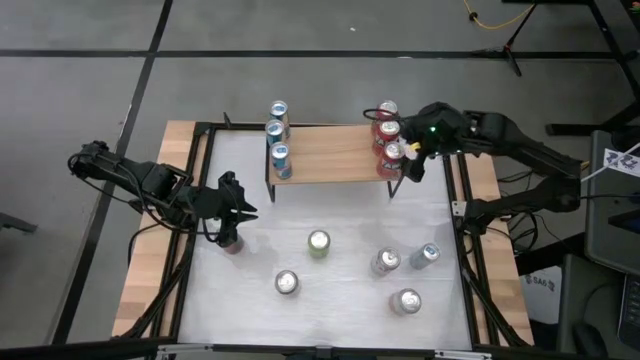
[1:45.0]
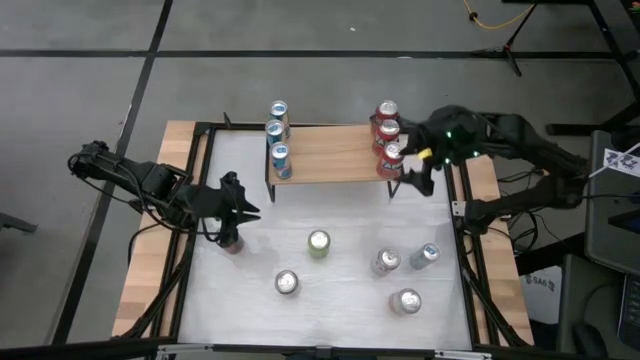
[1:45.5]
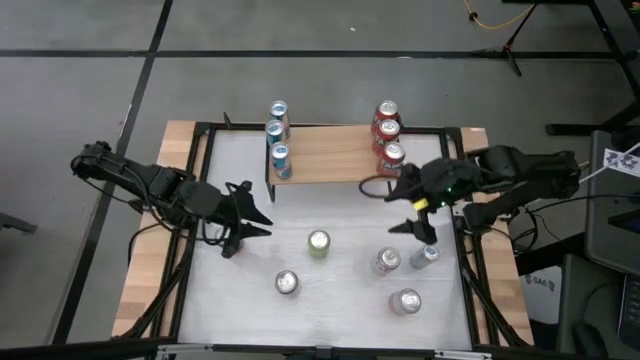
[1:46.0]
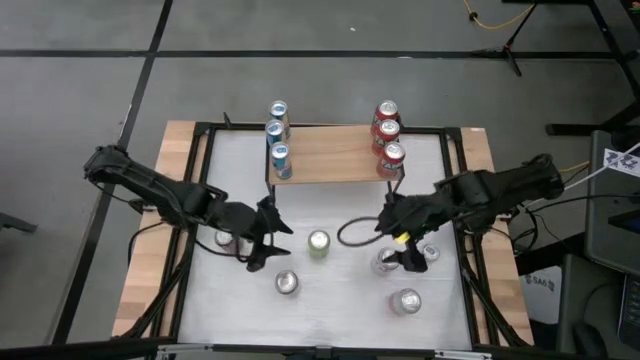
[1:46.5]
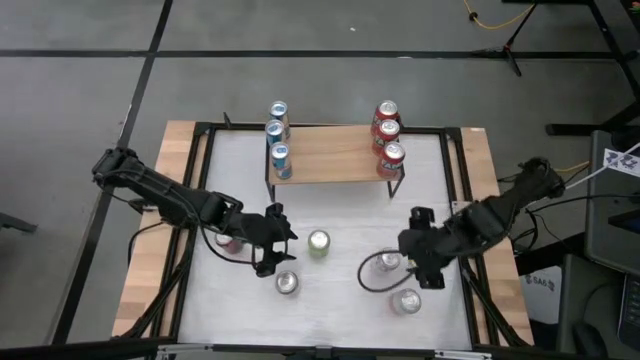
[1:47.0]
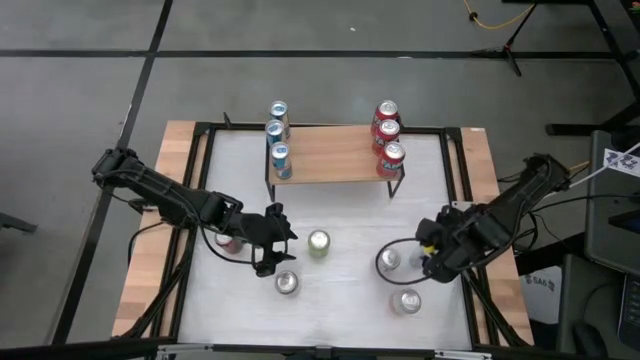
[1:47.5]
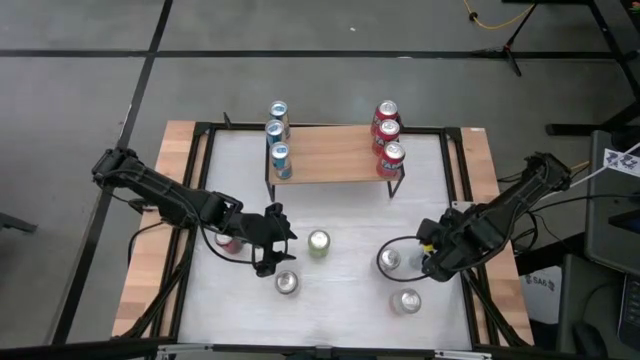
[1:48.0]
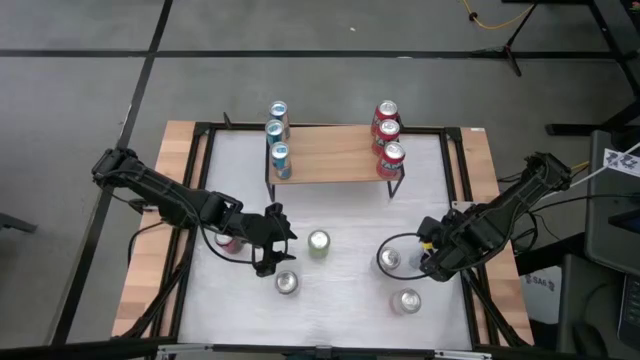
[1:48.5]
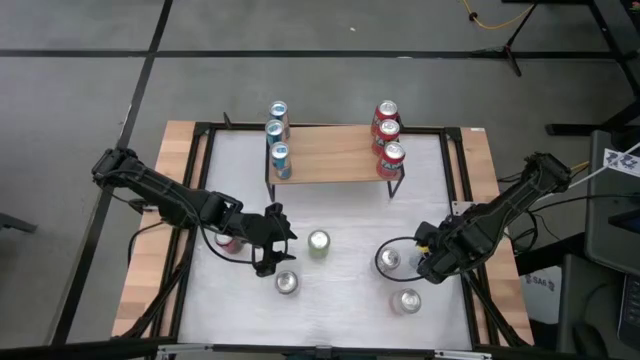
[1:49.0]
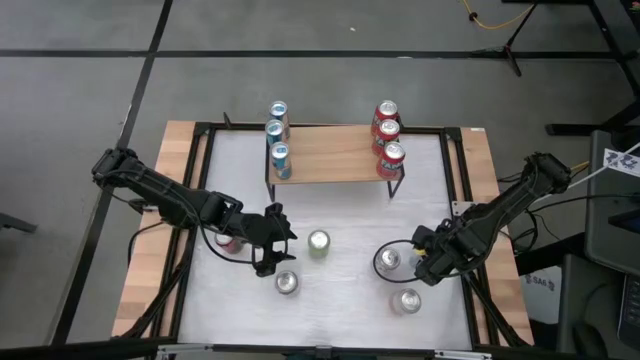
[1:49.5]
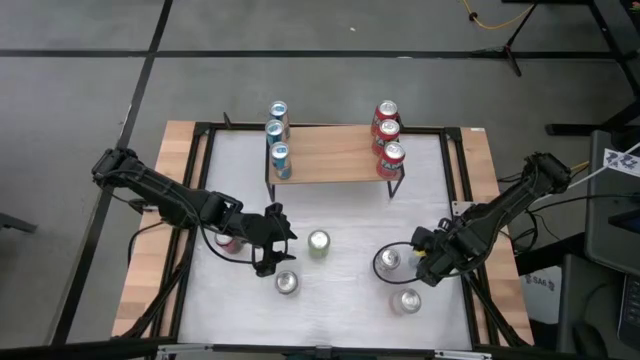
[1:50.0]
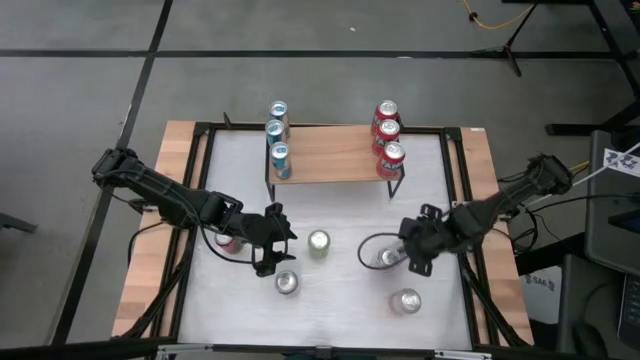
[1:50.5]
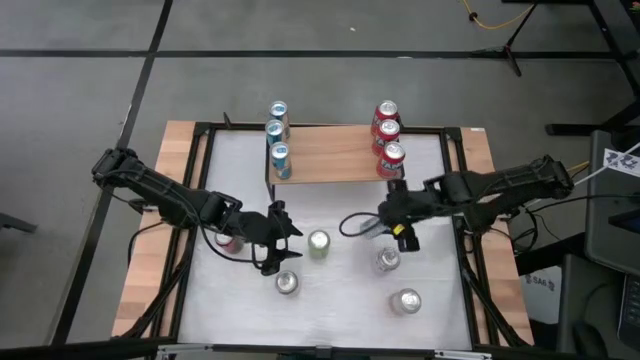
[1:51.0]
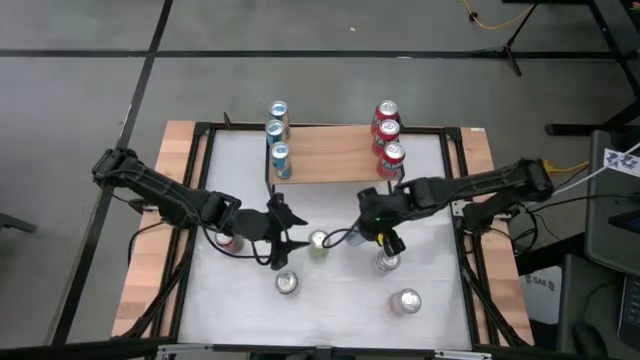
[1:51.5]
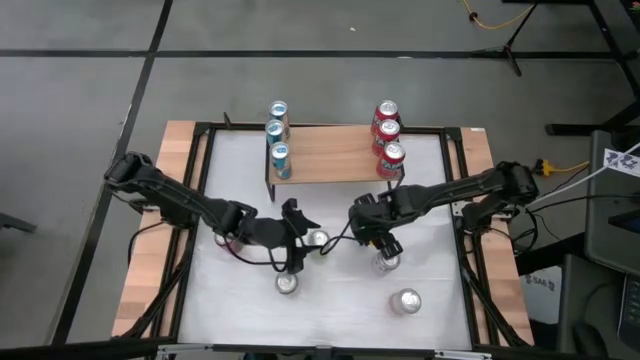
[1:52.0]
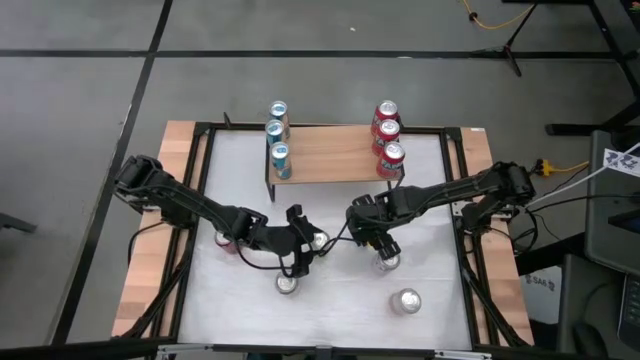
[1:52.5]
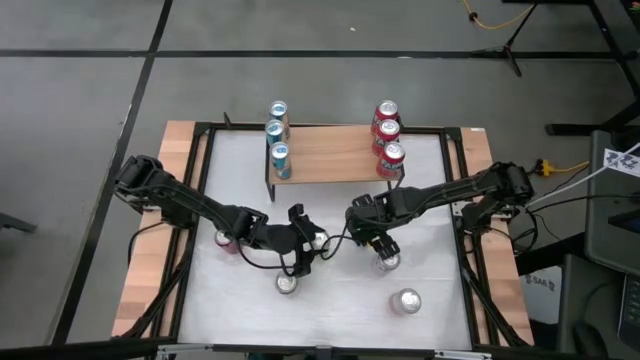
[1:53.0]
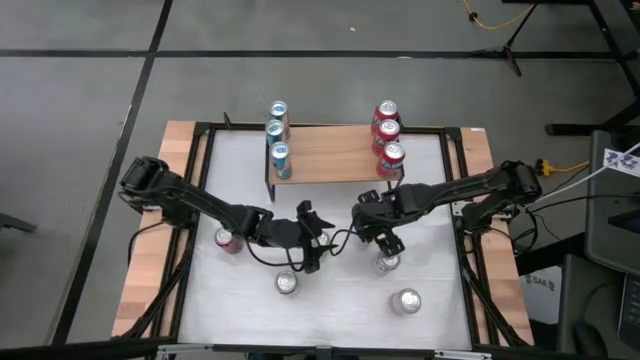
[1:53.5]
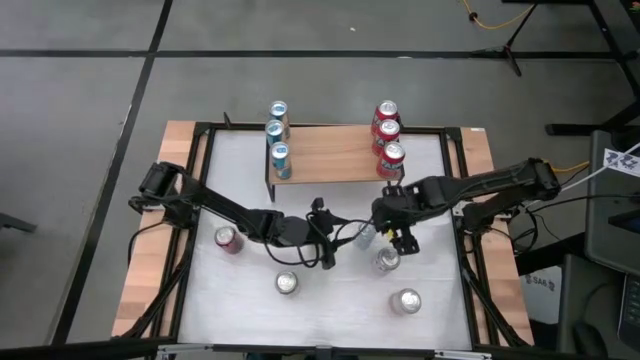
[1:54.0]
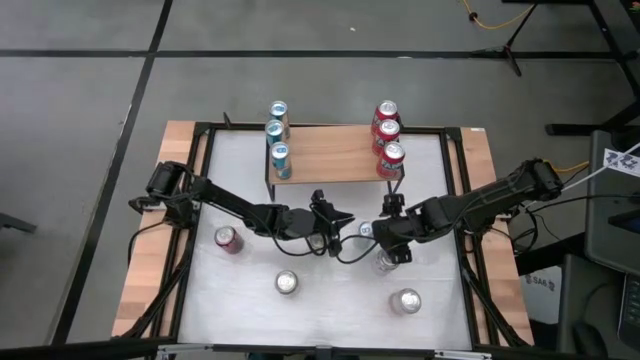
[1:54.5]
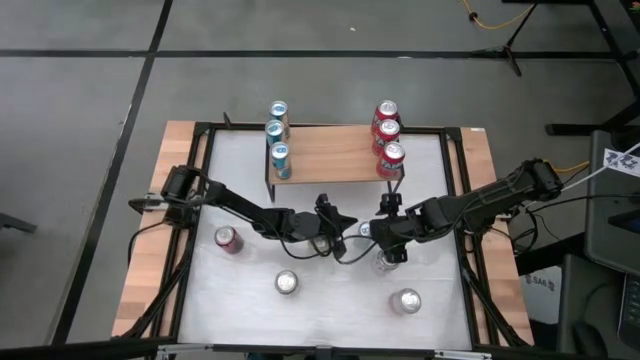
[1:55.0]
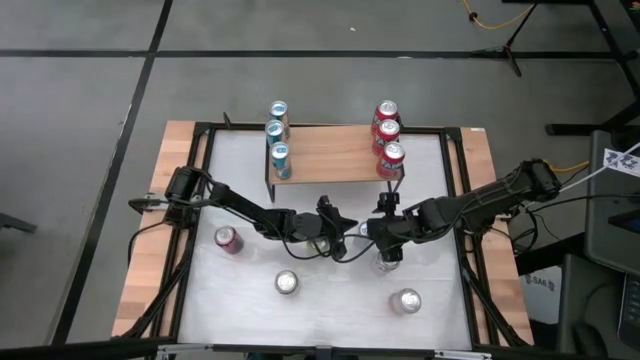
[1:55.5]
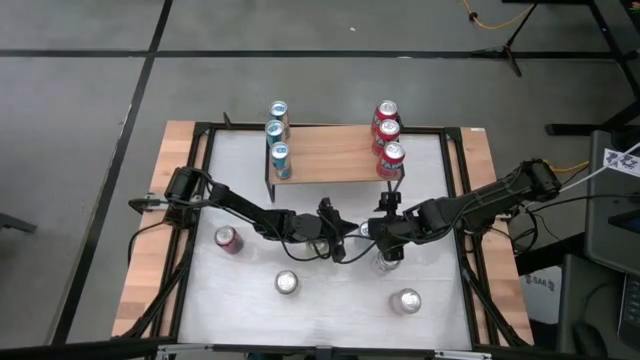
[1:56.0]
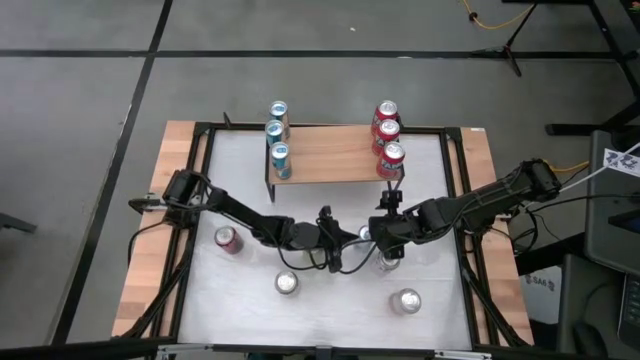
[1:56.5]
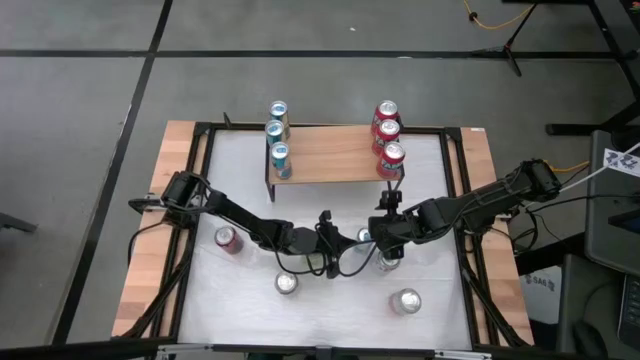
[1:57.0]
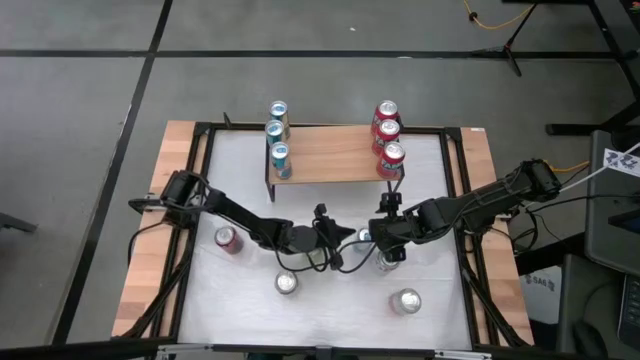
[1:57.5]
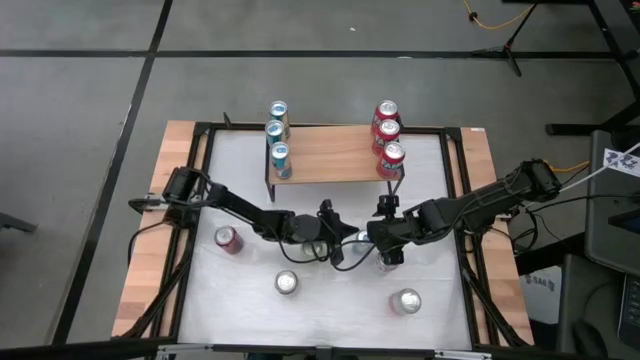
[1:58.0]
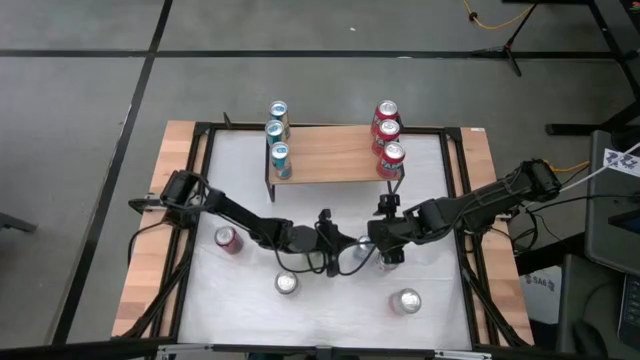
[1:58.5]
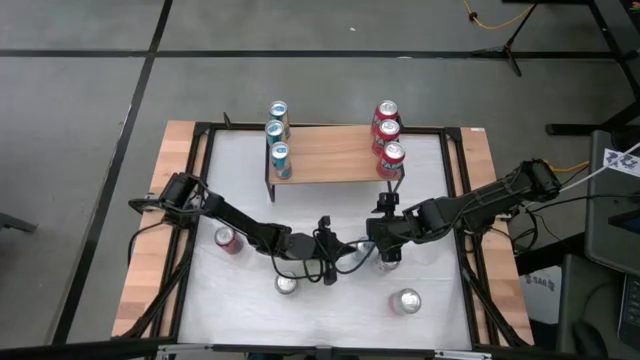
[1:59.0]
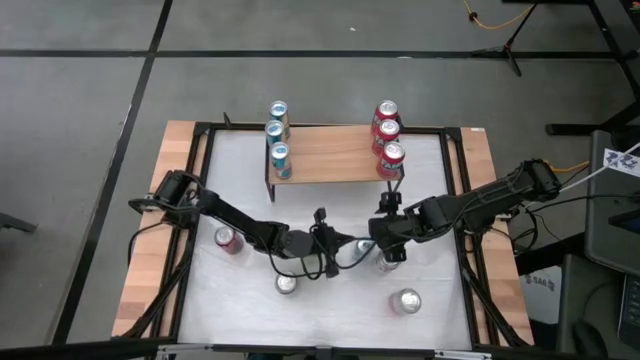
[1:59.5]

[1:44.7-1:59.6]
Task: Sort soda cans
Put the blue soda can on the shelf aligned with the blue soda cans

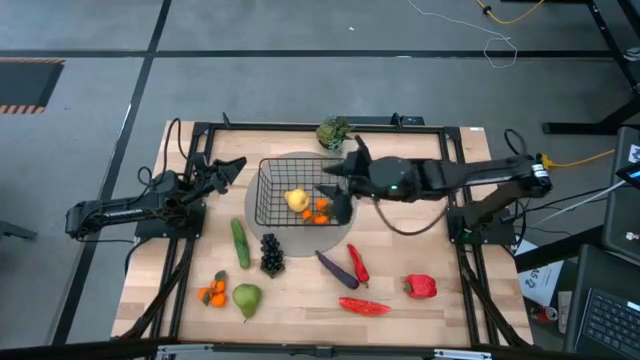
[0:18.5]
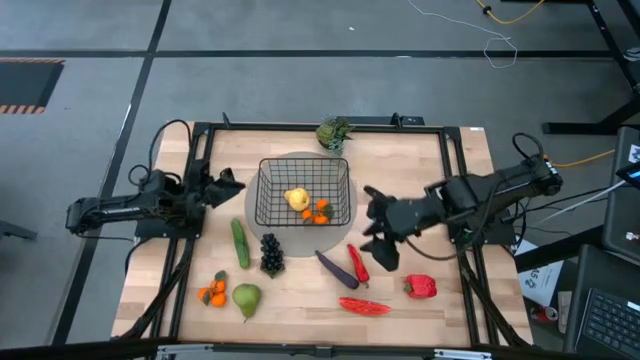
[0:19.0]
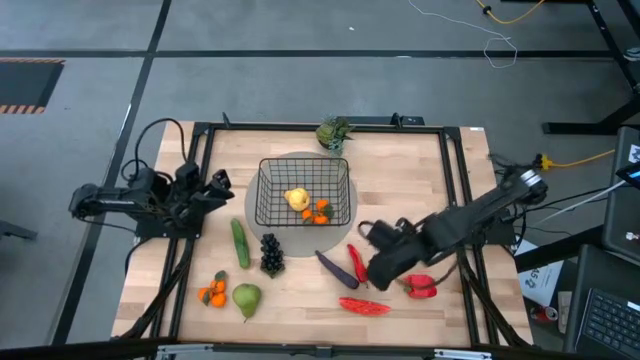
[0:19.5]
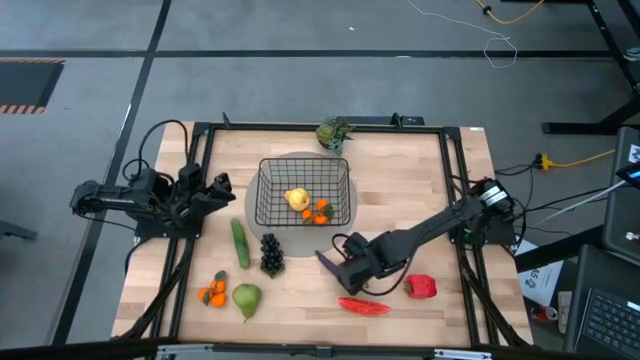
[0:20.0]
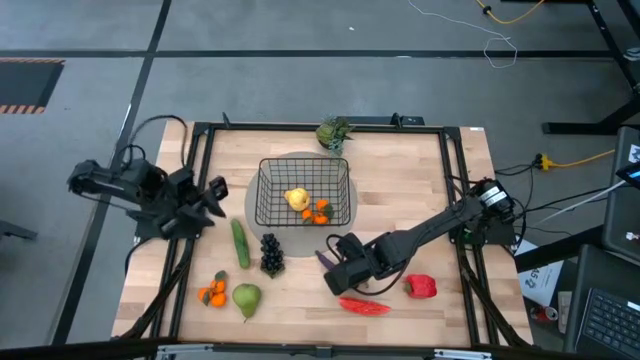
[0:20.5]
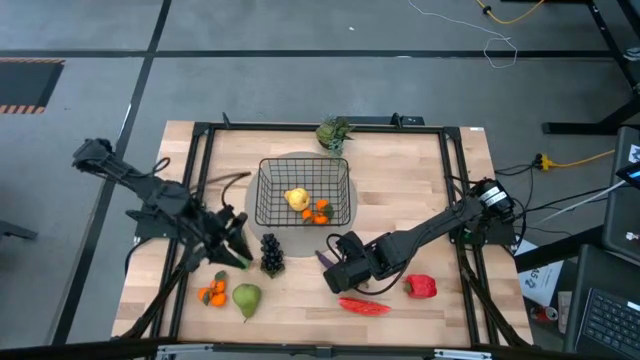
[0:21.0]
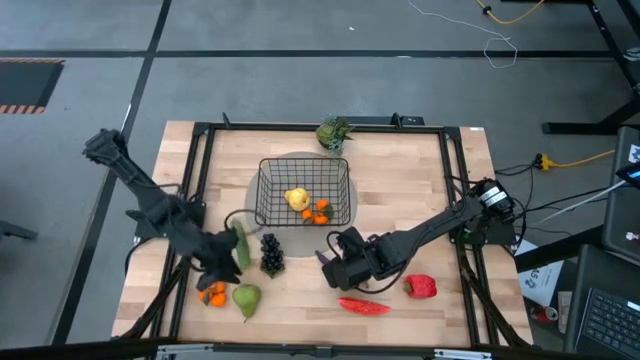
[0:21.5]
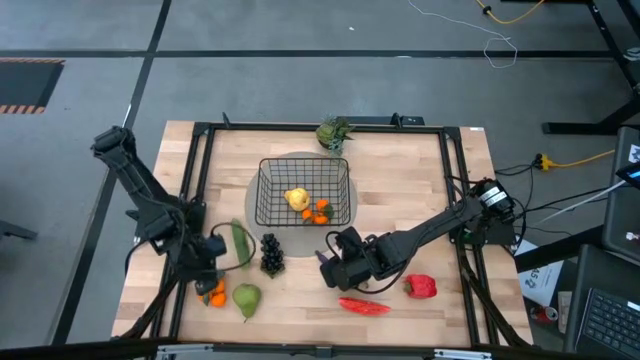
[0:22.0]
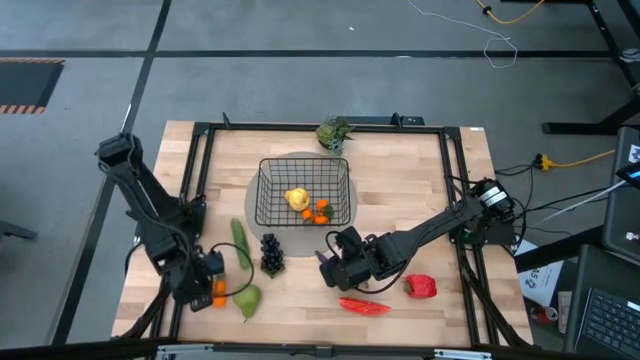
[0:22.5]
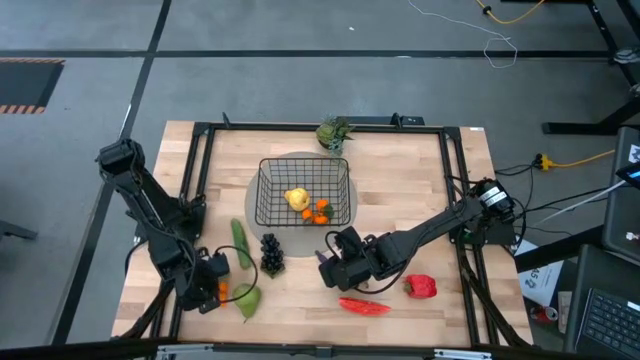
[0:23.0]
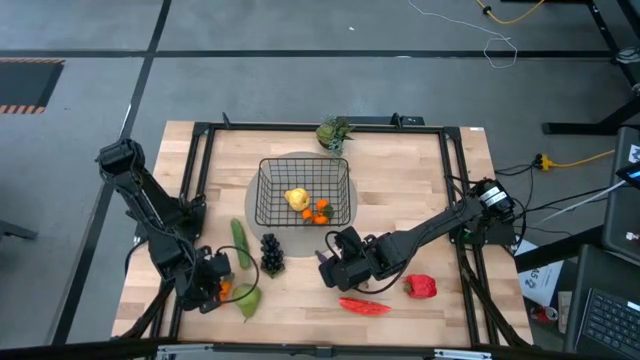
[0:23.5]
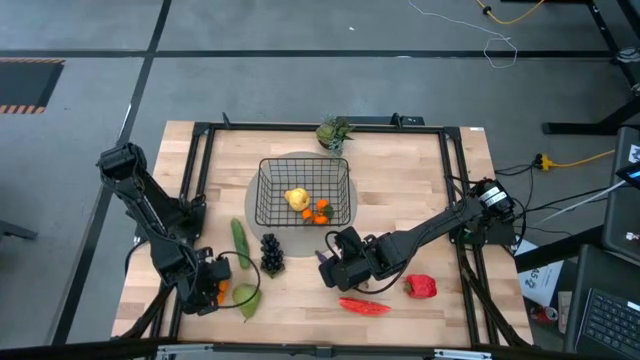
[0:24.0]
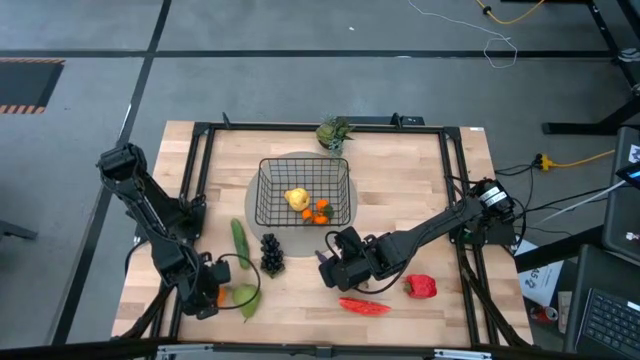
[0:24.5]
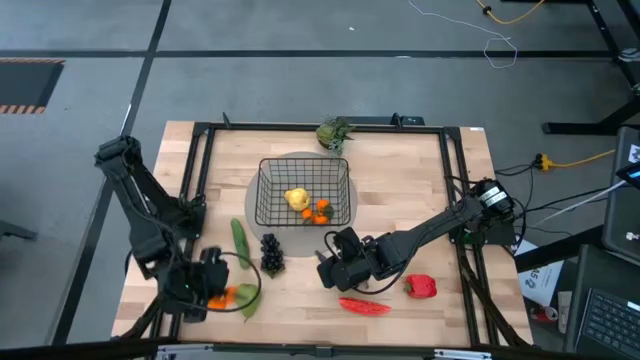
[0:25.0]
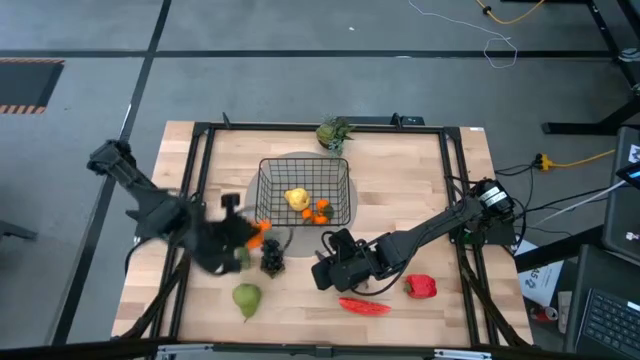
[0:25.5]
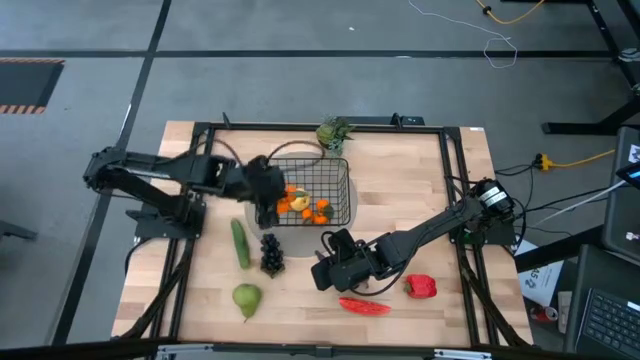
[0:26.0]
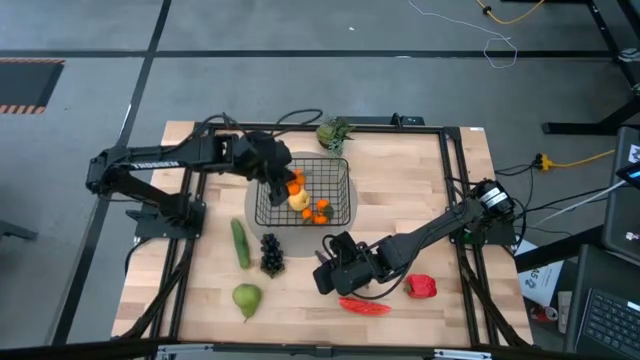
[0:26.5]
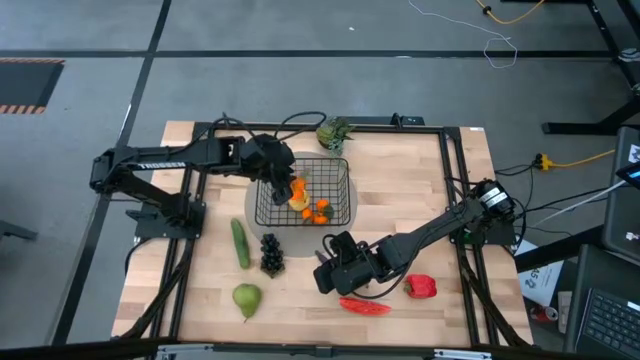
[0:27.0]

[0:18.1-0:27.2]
Task: Build produce basket
Put the oranges into the black wire basket
